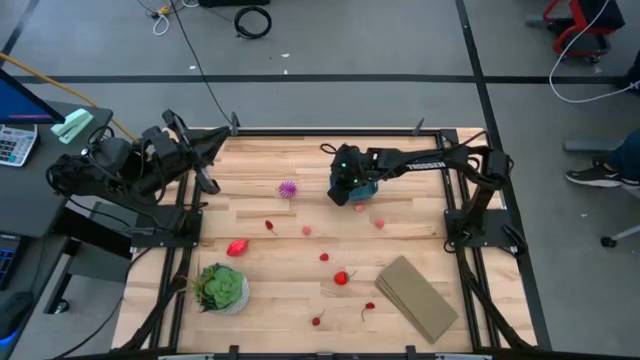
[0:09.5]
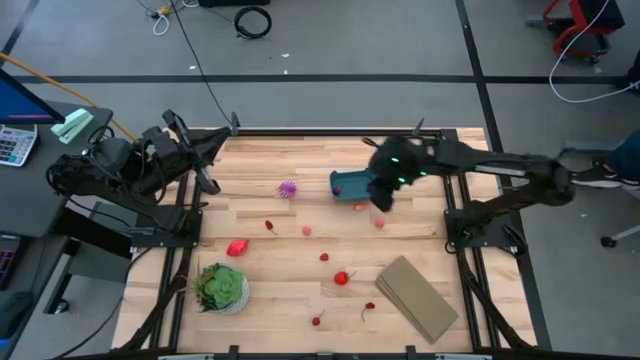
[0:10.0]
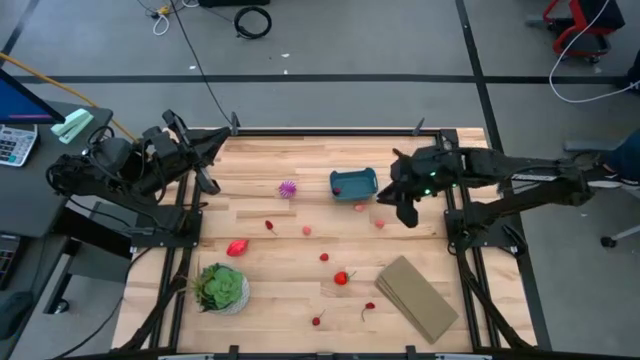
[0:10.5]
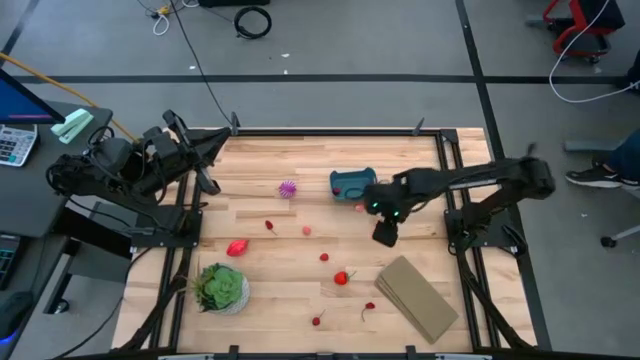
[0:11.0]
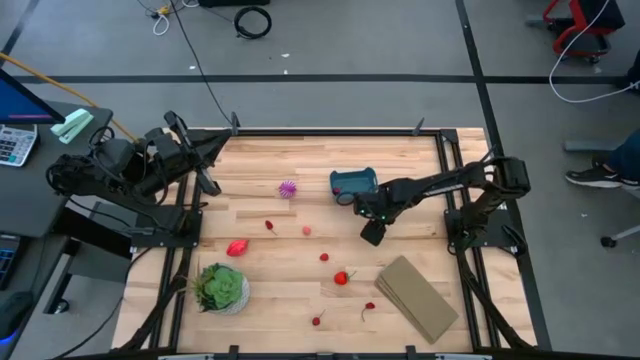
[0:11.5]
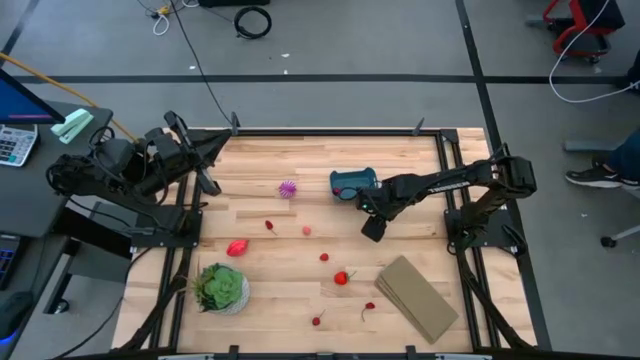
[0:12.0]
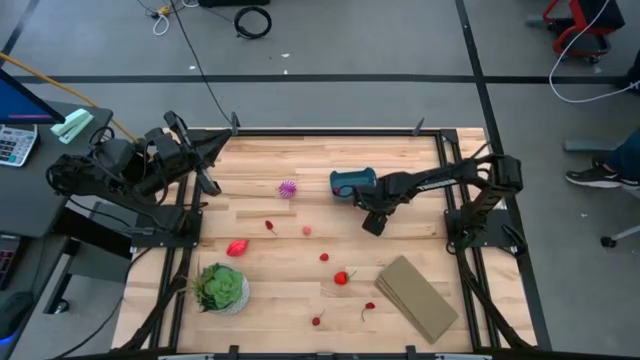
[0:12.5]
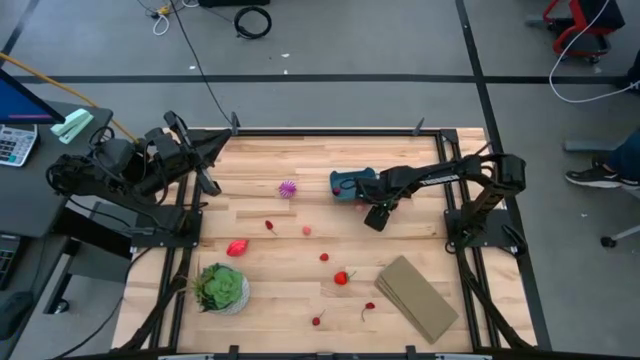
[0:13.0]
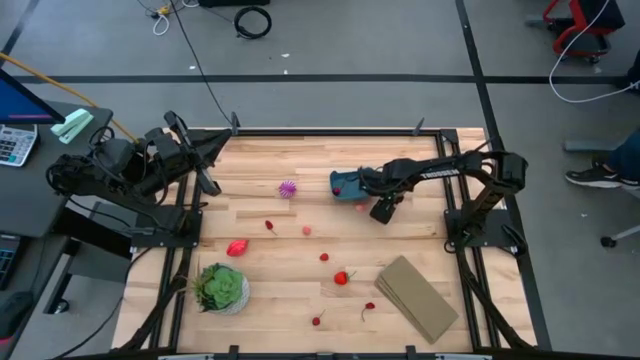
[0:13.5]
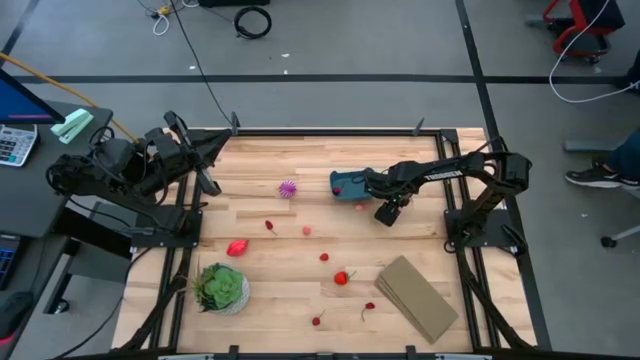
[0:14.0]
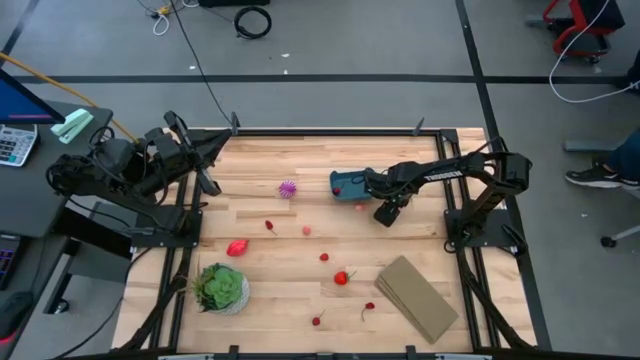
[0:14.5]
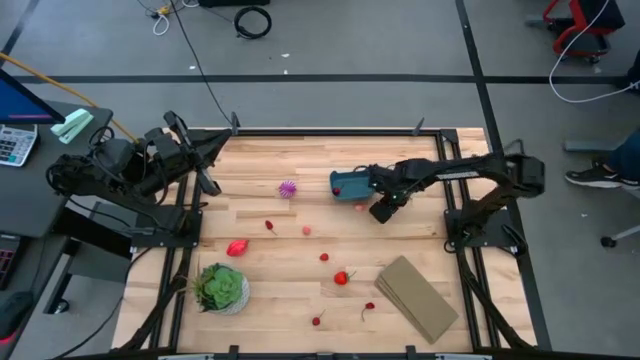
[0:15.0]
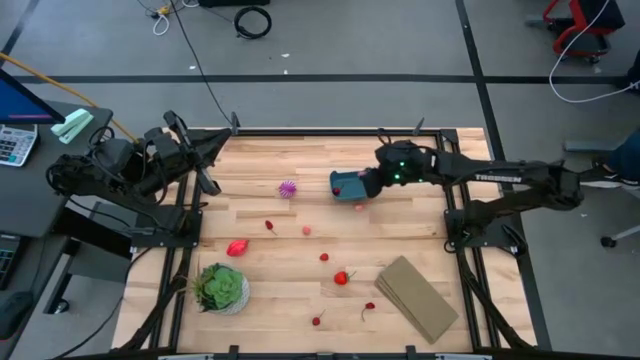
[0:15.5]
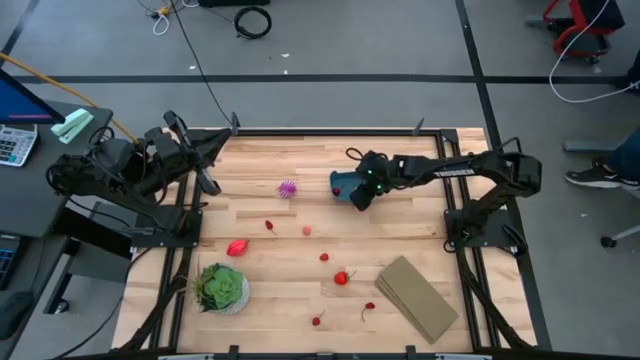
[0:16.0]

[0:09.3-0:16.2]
Task: Pick and placing Produce into tupperware
Put the right peach in the bin

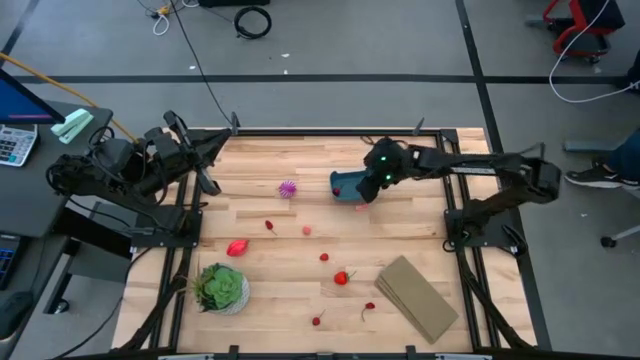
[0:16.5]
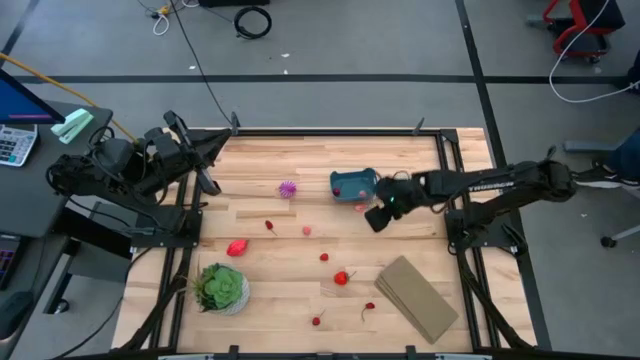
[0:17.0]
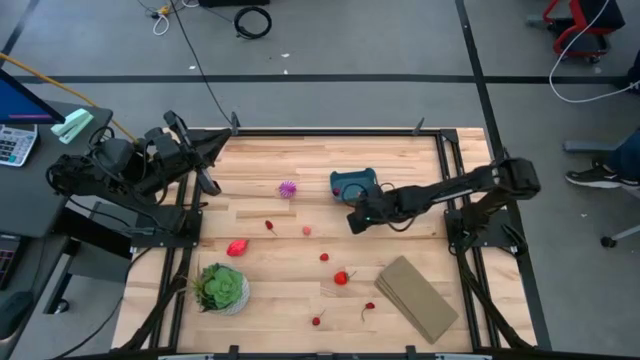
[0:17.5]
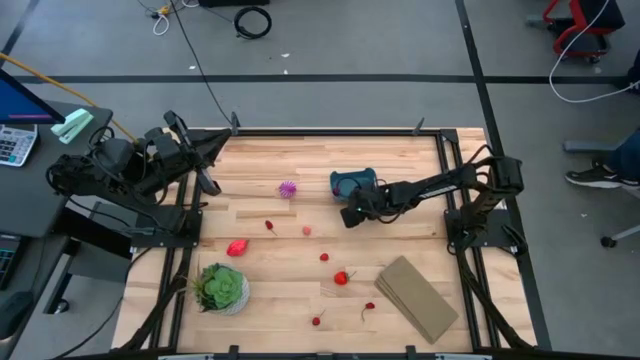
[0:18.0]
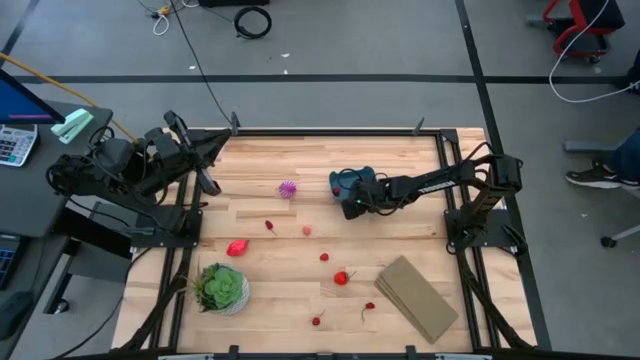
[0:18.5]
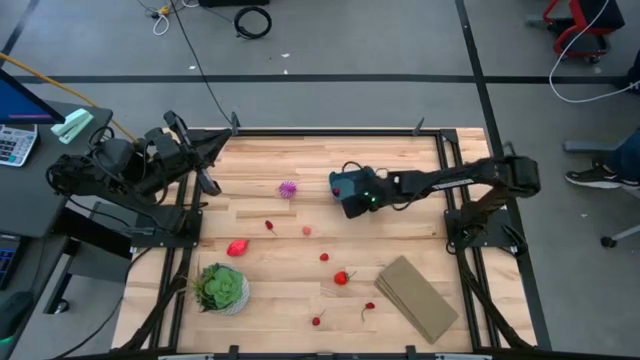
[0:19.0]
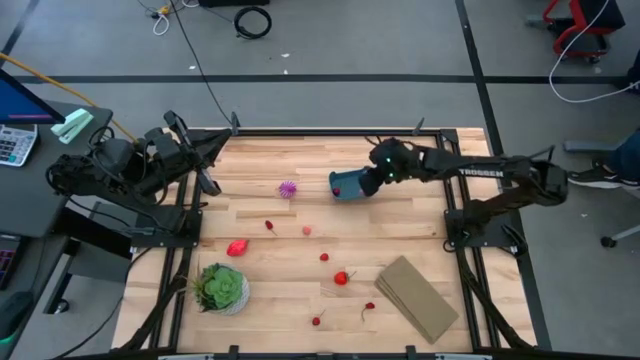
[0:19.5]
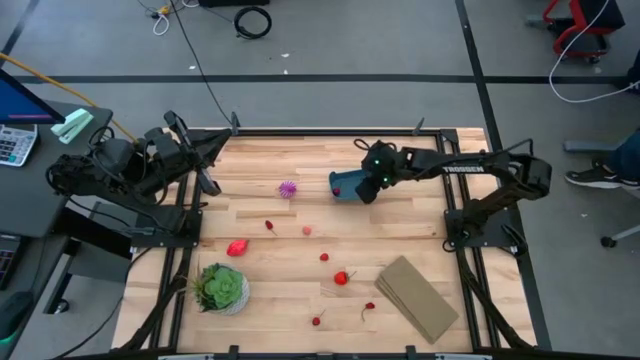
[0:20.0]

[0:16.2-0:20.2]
Put the right peach in the bin

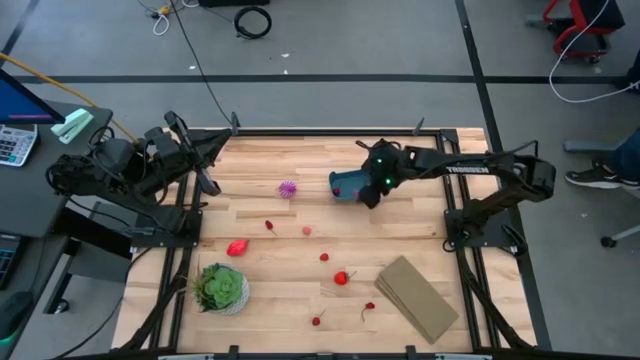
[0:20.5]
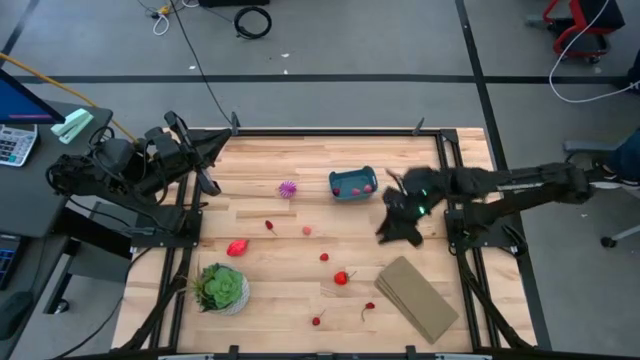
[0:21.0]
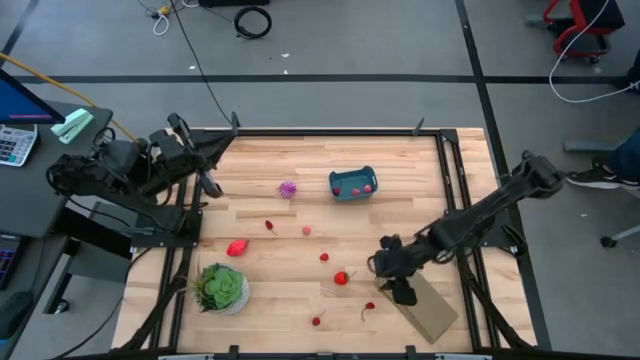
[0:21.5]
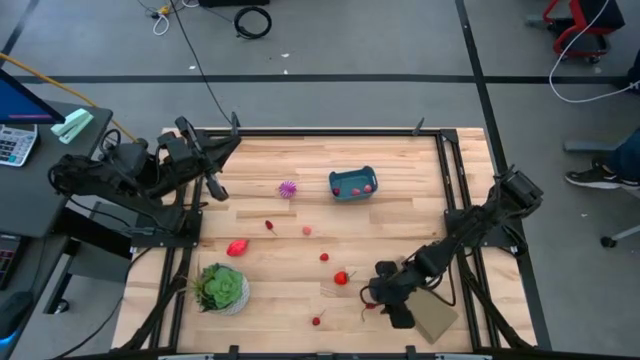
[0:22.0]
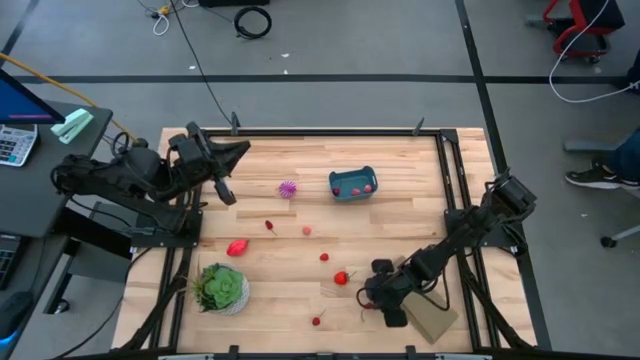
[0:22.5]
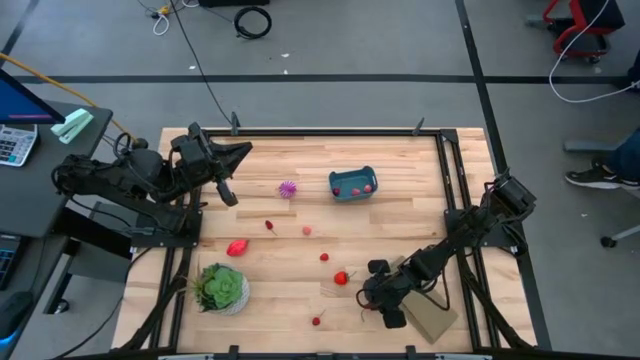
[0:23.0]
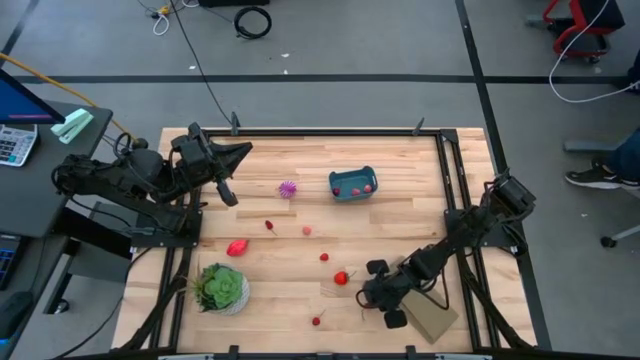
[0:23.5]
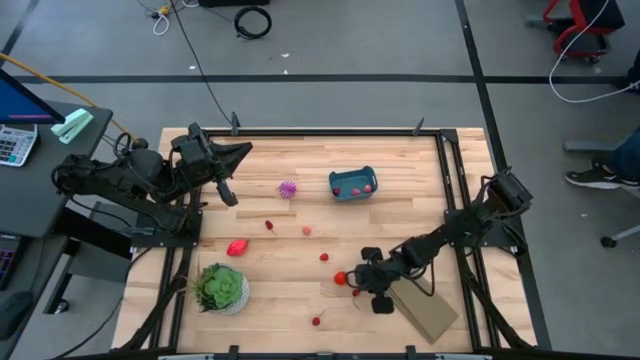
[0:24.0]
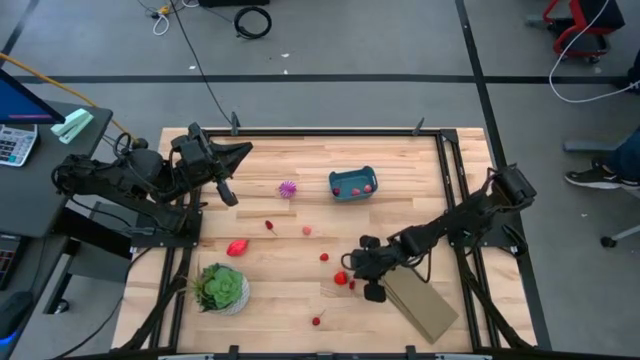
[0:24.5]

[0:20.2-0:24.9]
Put the right cherry in the bin

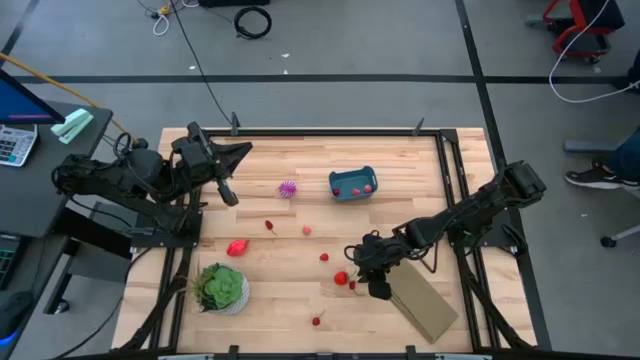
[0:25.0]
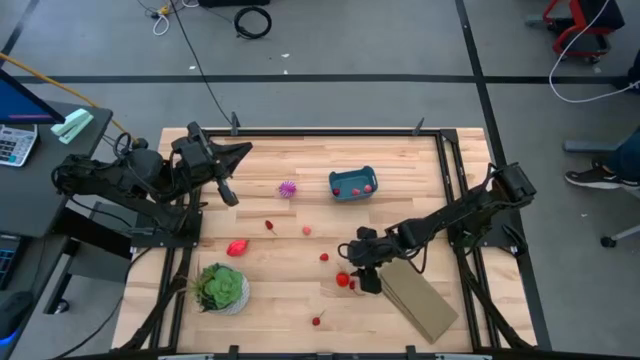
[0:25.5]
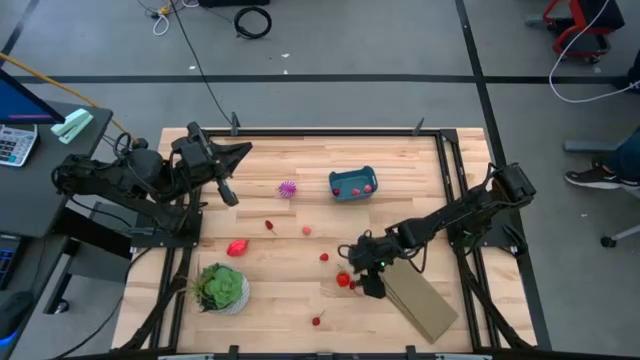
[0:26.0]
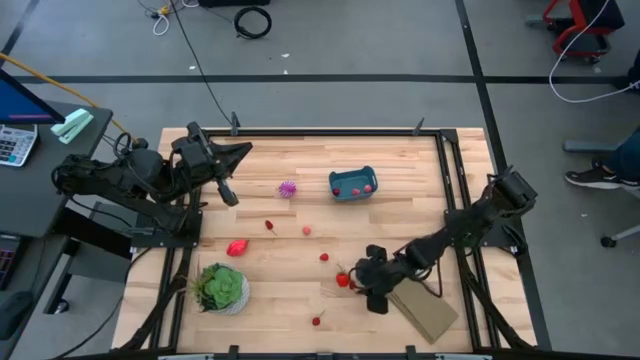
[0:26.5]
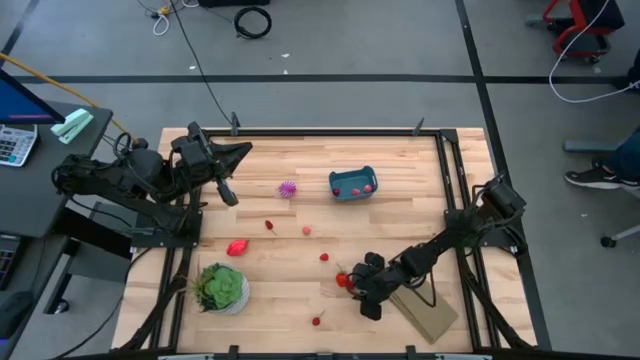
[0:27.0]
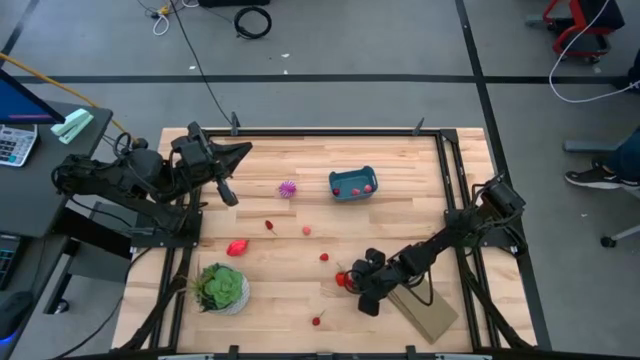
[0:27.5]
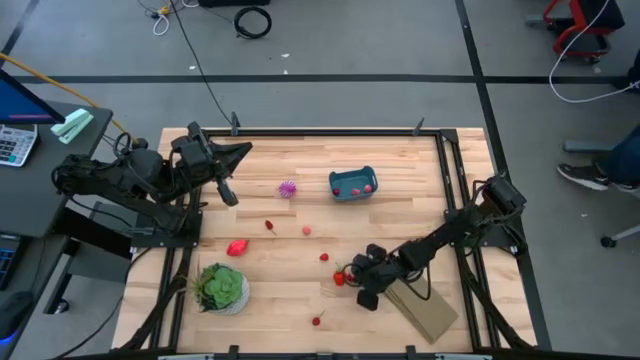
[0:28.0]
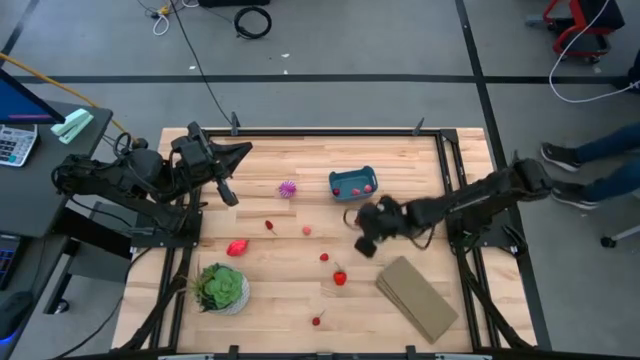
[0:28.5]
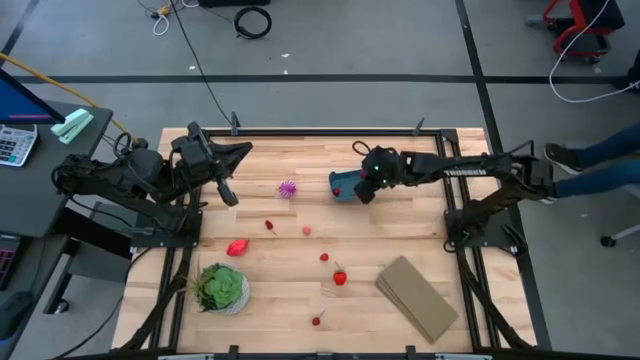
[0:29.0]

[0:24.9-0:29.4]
Put the right cherry in the bin

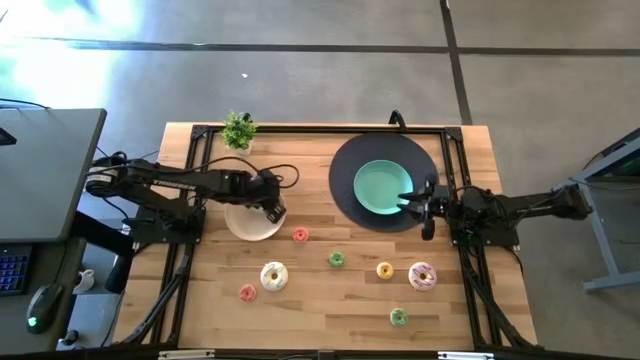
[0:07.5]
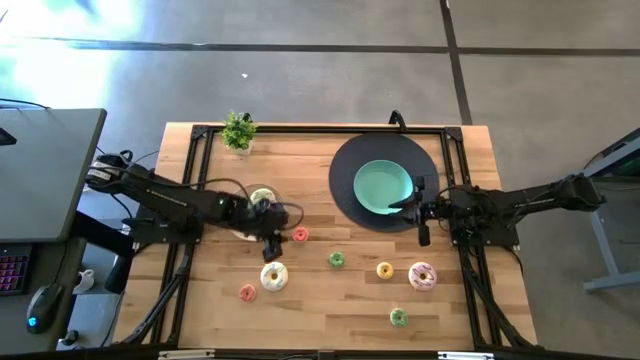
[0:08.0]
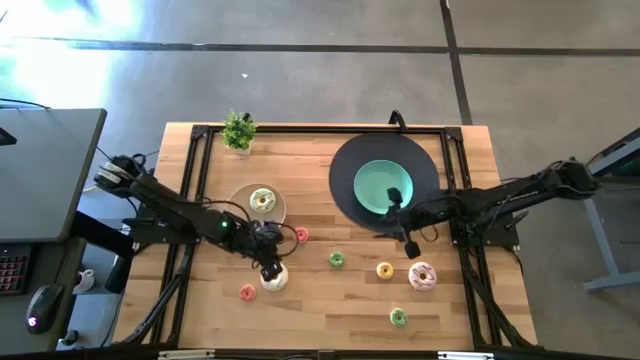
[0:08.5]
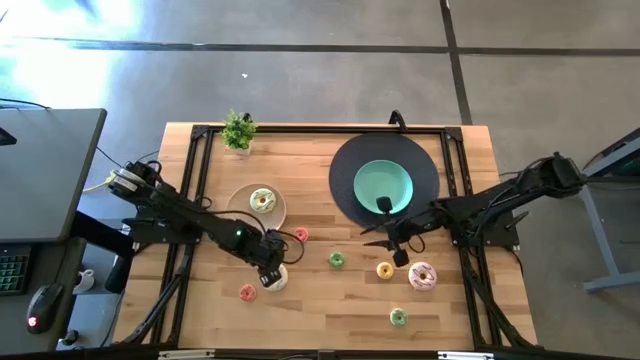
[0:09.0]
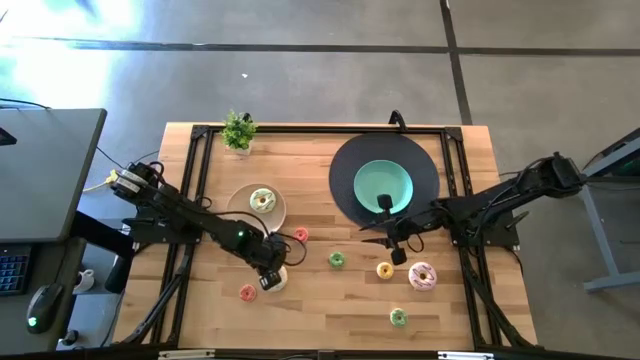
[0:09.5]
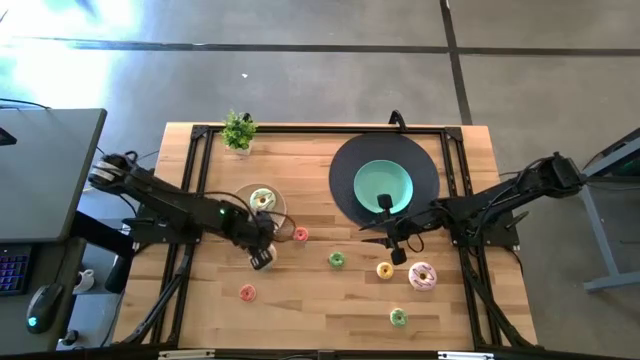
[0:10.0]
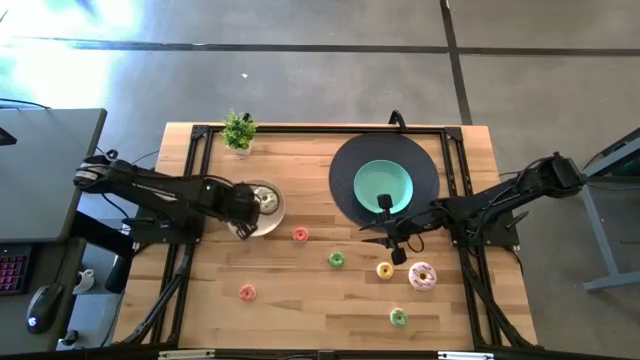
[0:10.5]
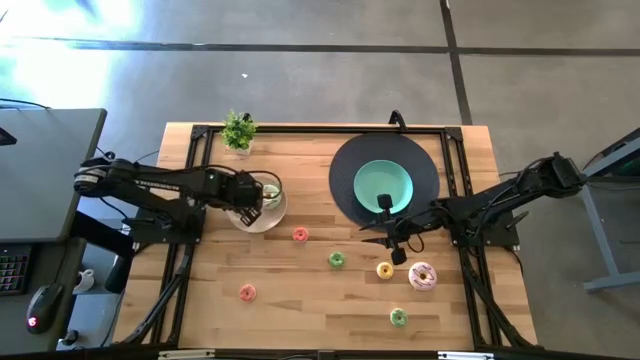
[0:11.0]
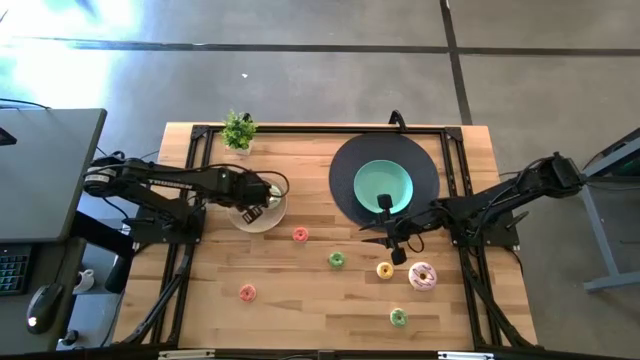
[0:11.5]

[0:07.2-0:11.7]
Task: Pick & Place donuts
Put the large white donut on the white plate
